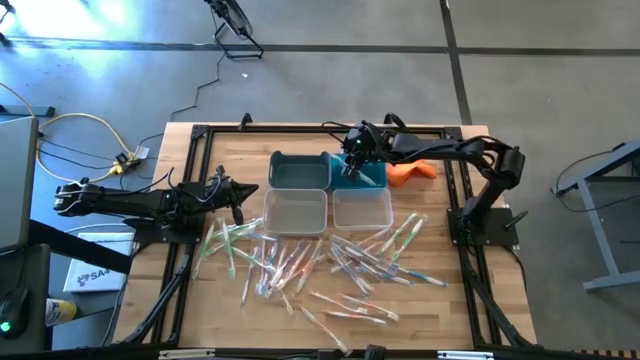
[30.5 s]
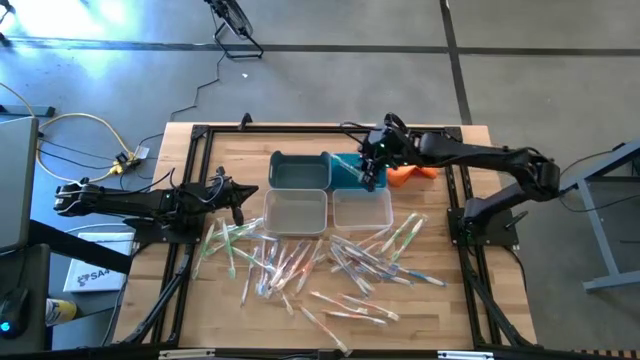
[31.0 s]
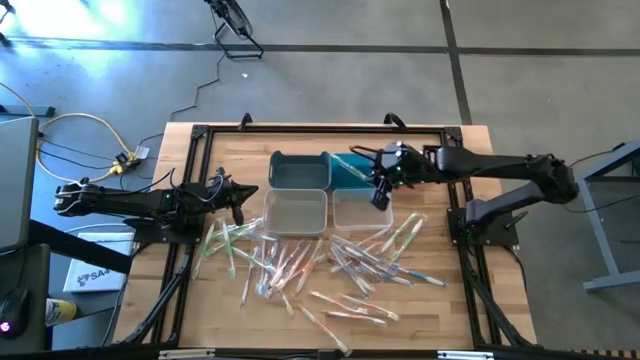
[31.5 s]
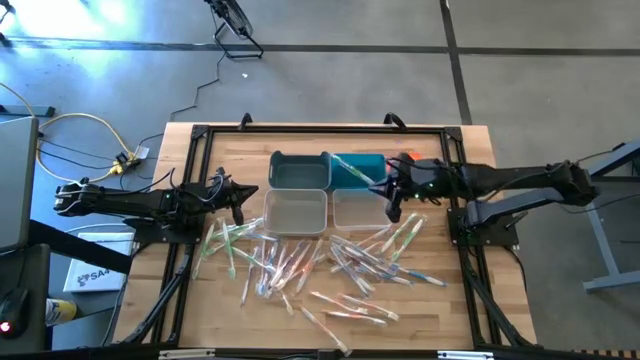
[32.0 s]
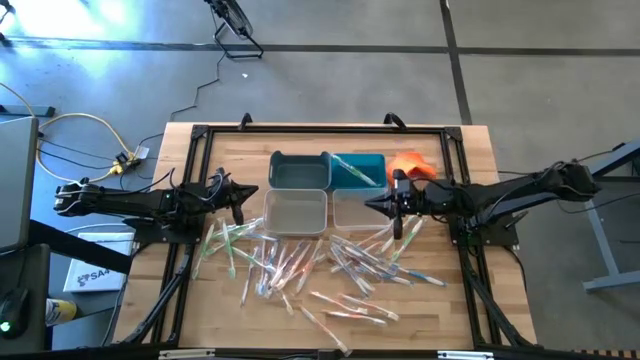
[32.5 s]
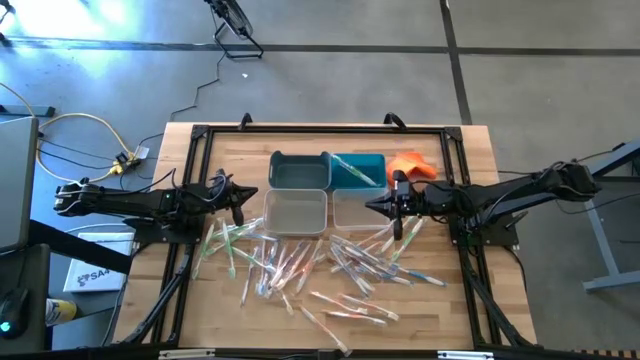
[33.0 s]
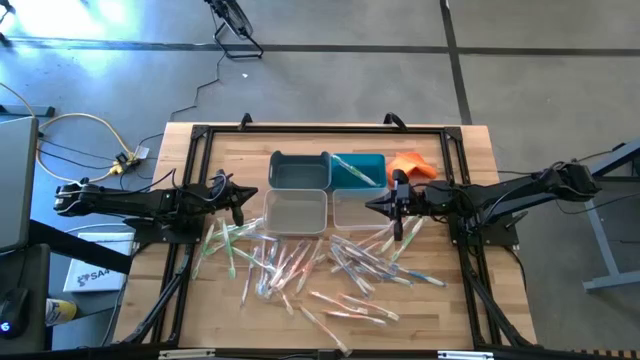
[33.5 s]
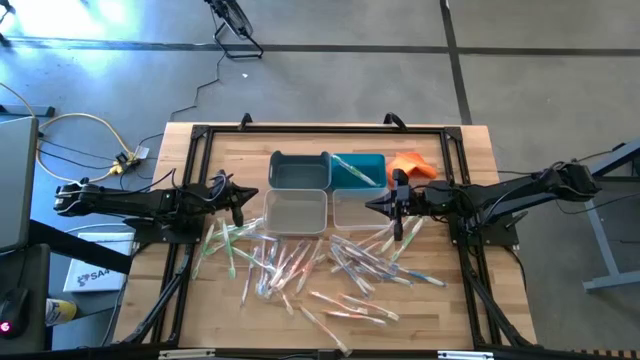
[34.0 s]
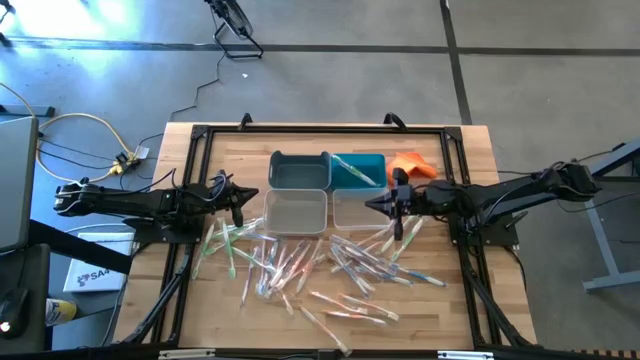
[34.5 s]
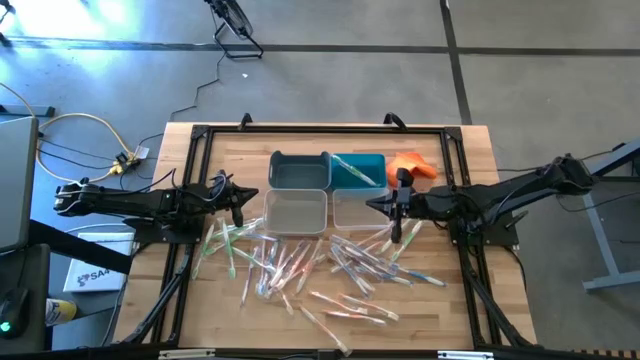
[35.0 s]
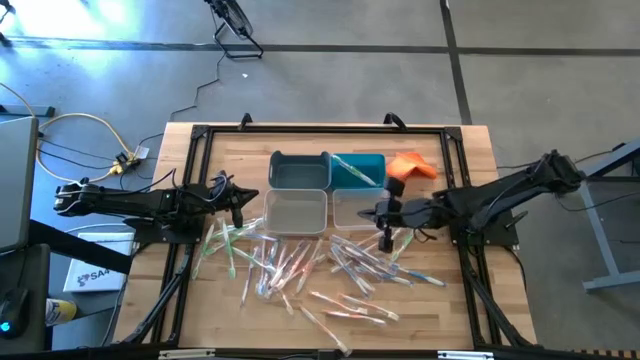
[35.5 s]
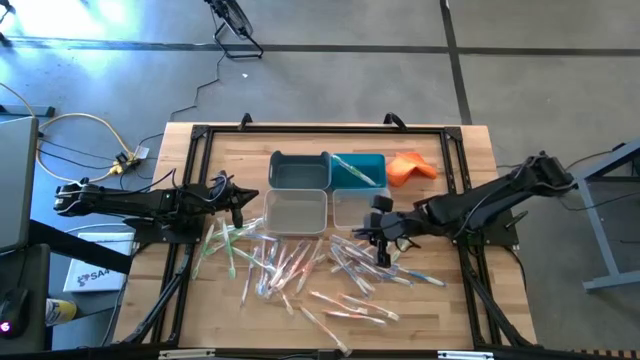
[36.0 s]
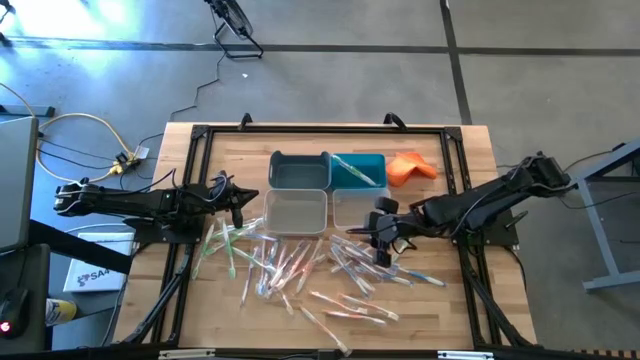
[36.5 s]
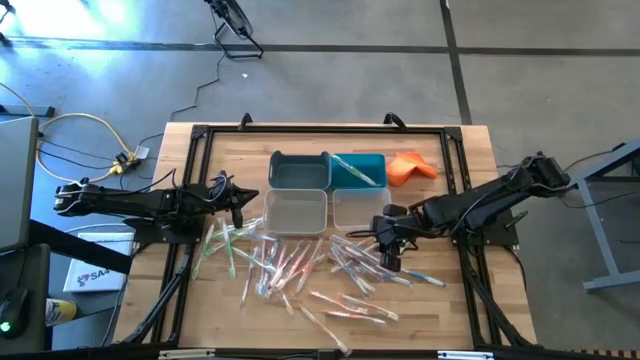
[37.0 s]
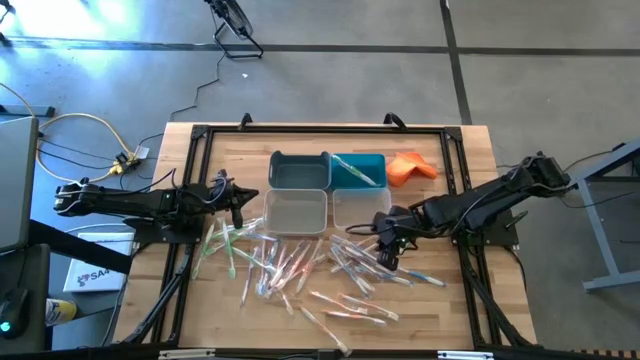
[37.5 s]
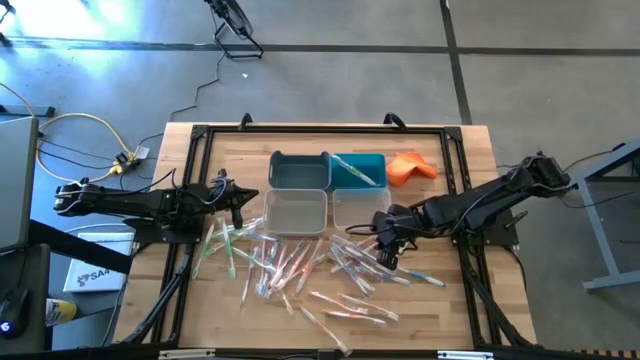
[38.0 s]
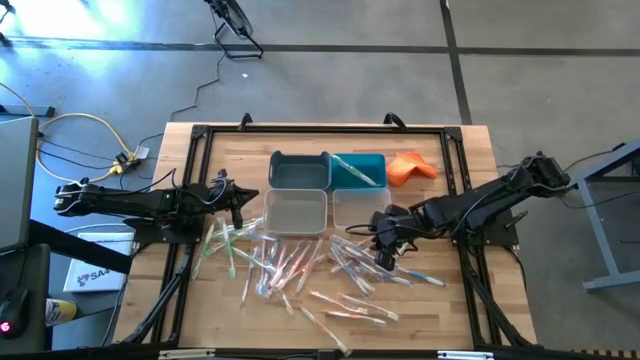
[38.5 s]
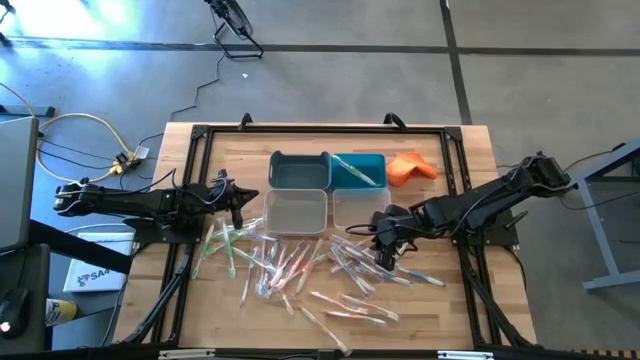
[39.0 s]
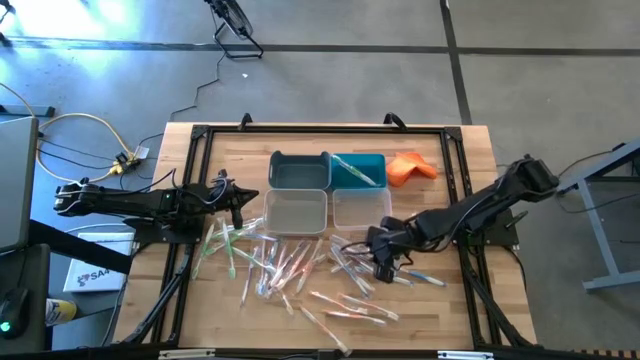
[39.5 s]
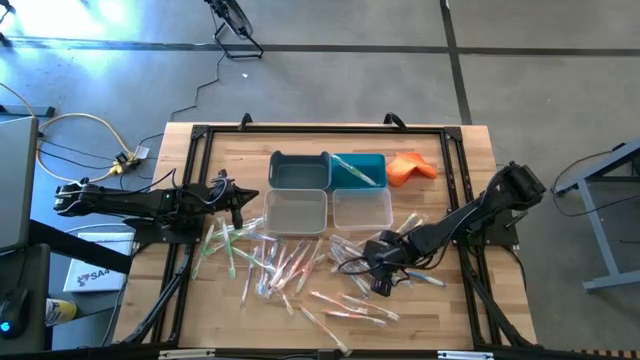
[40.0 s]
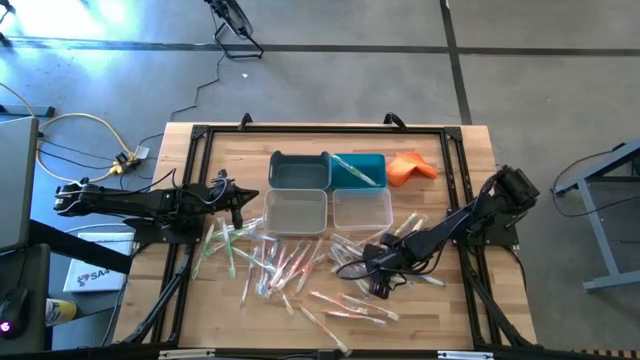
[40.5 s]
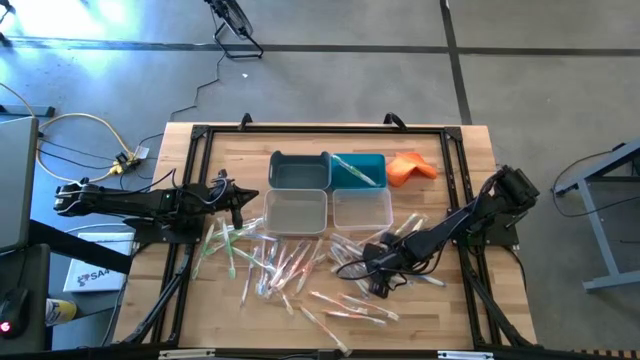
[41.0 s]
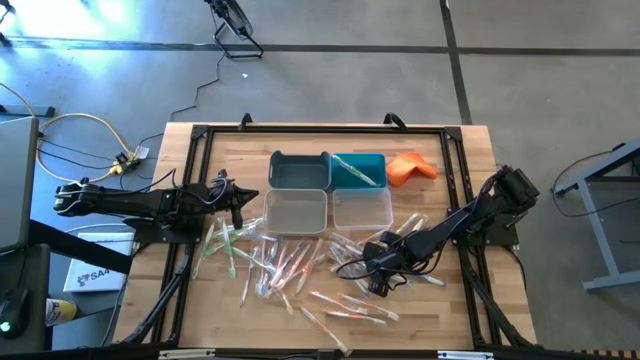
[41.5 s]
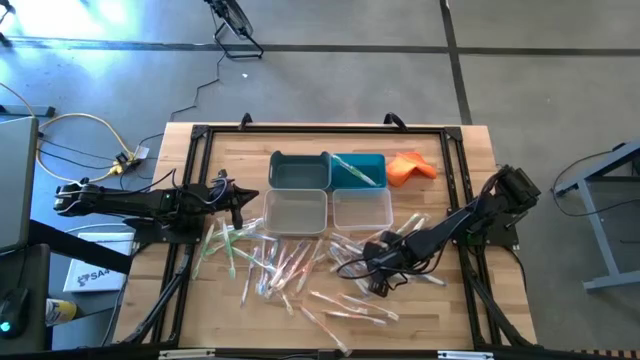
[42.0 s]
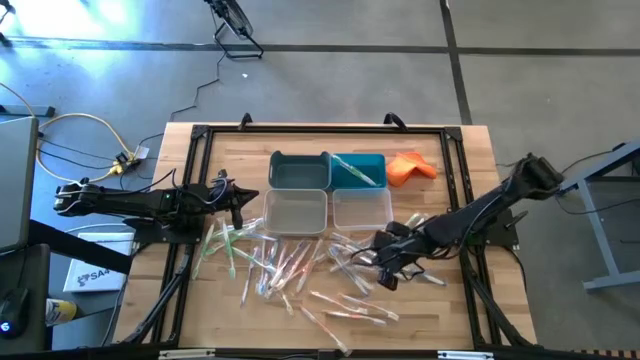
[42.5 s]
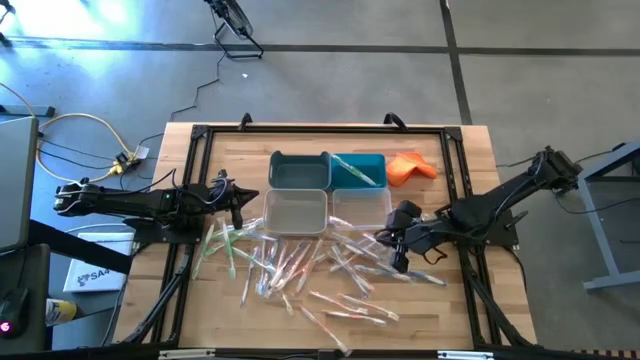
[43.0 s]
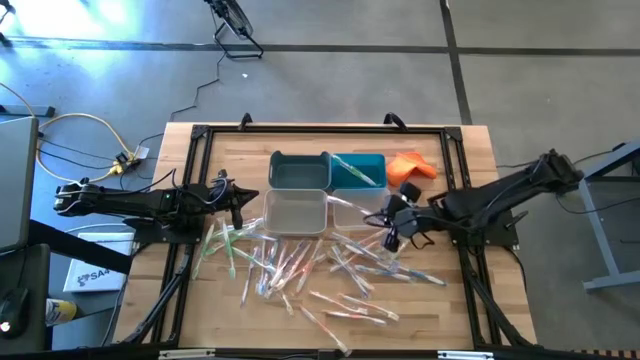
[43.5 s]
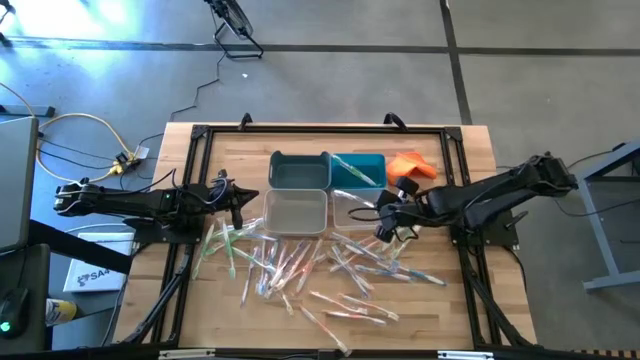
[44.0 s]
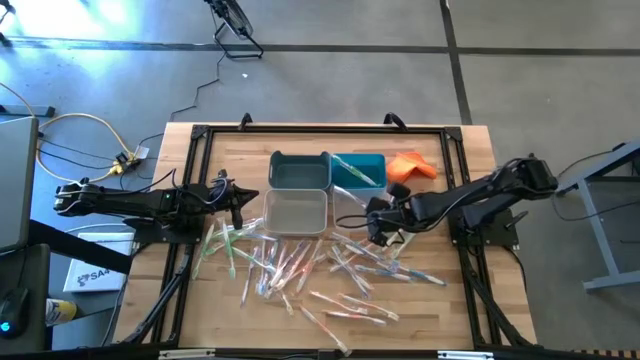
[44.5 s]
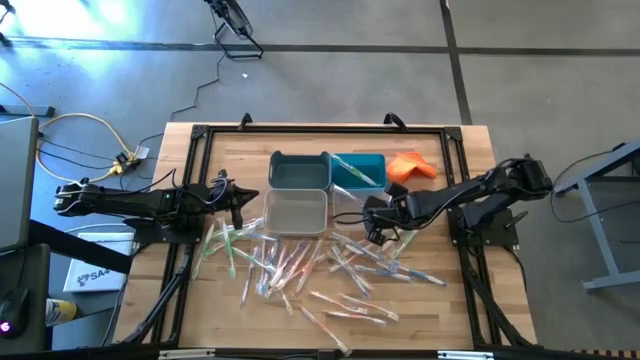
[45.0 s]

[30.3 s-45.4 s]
Task: Pick & Place Toothbrushes
Put the purple toothbrush into the transparent bin

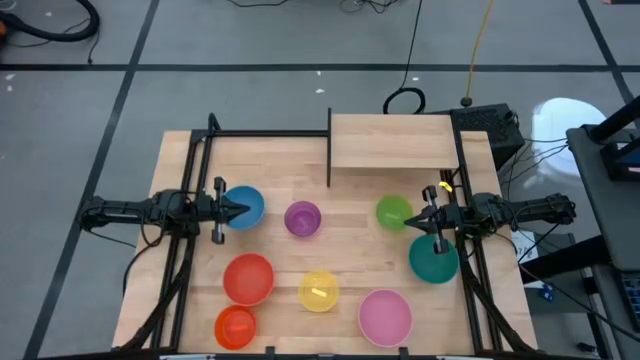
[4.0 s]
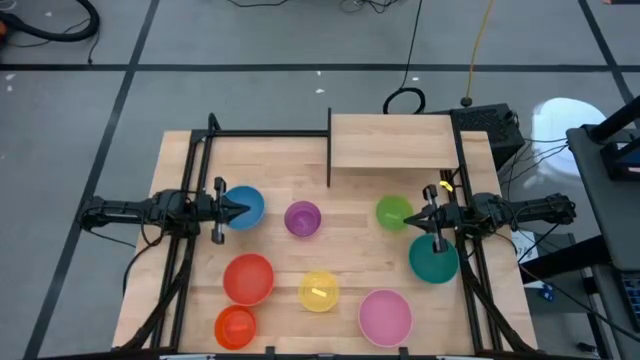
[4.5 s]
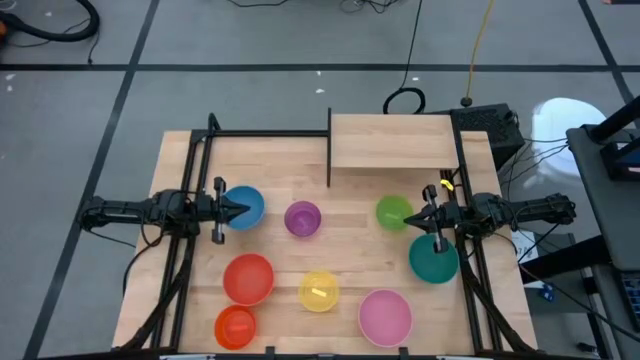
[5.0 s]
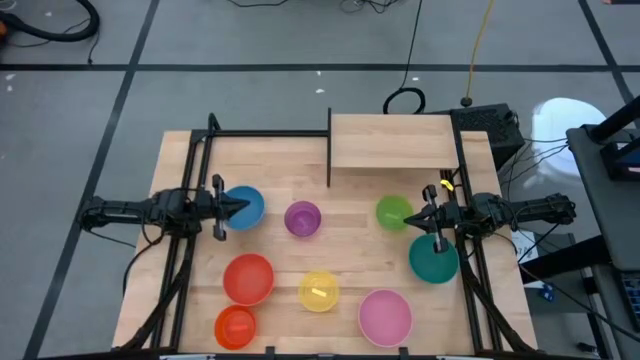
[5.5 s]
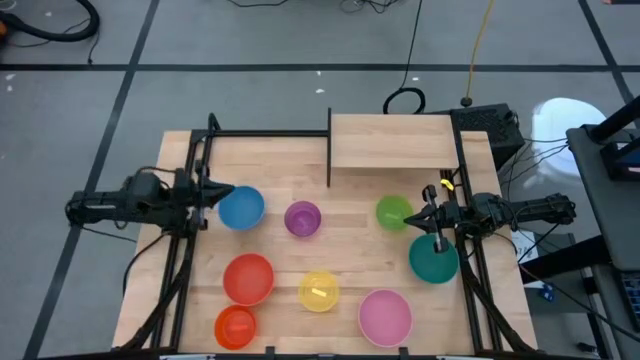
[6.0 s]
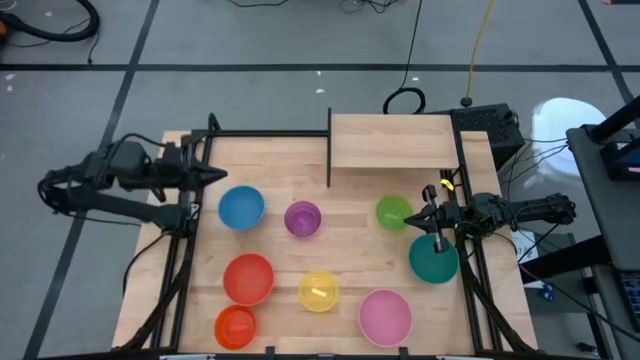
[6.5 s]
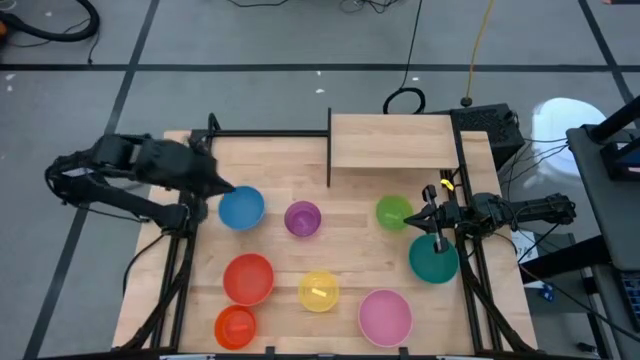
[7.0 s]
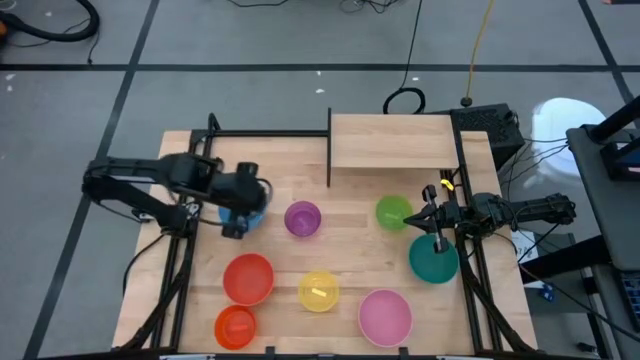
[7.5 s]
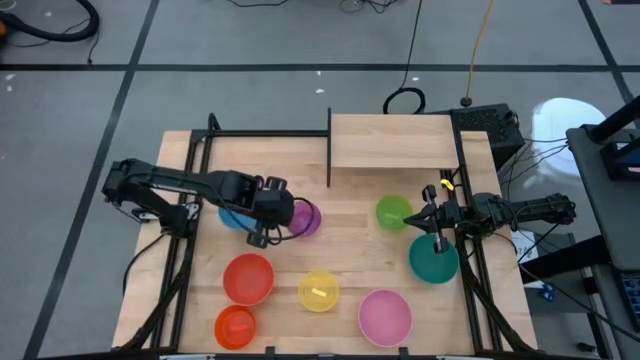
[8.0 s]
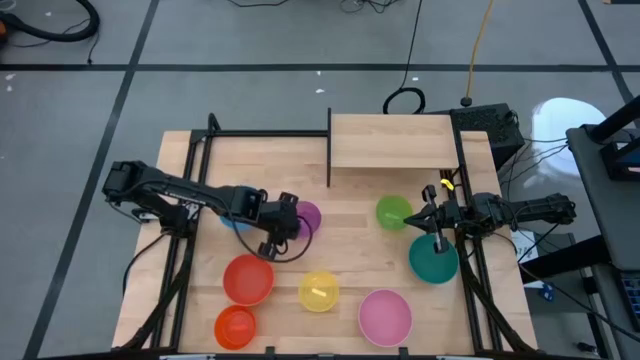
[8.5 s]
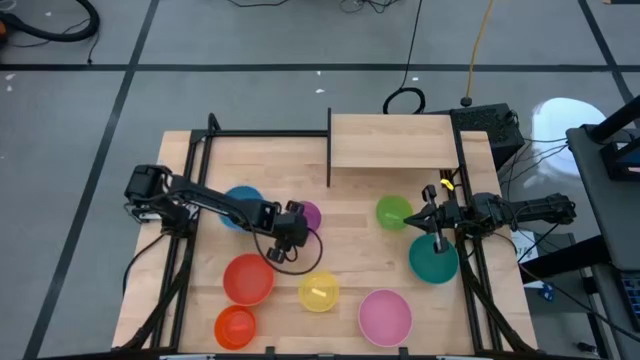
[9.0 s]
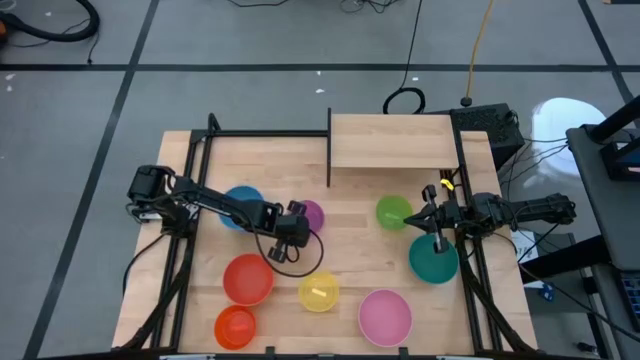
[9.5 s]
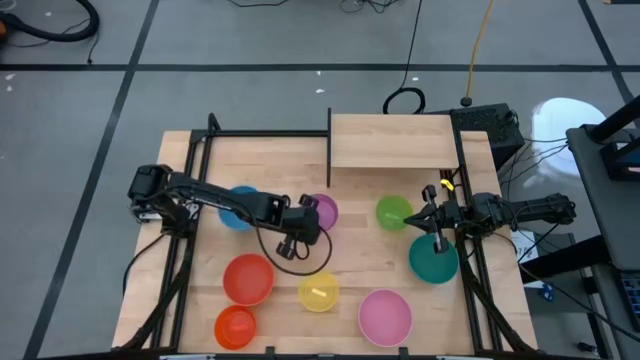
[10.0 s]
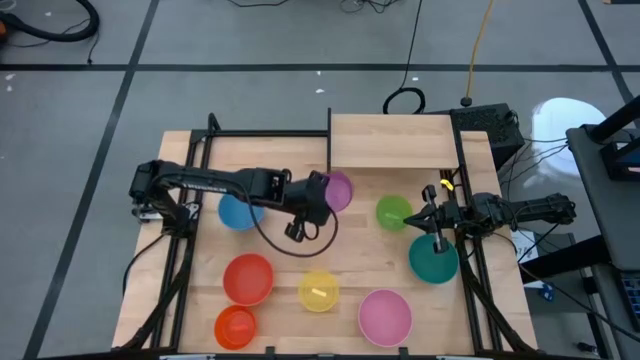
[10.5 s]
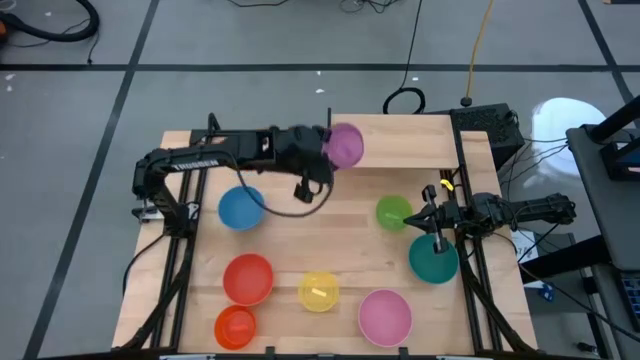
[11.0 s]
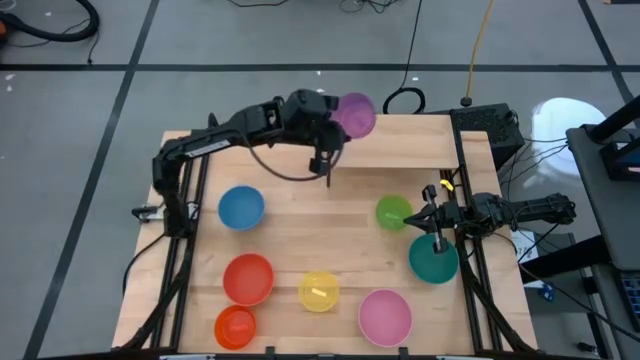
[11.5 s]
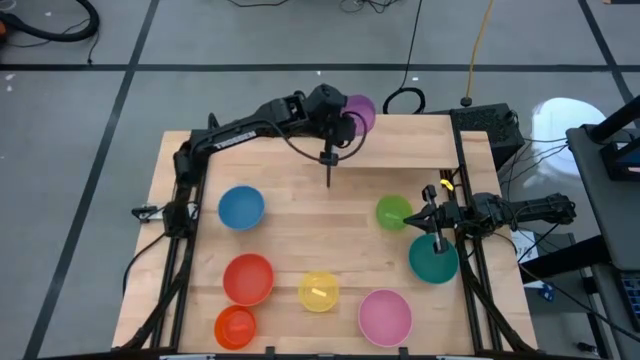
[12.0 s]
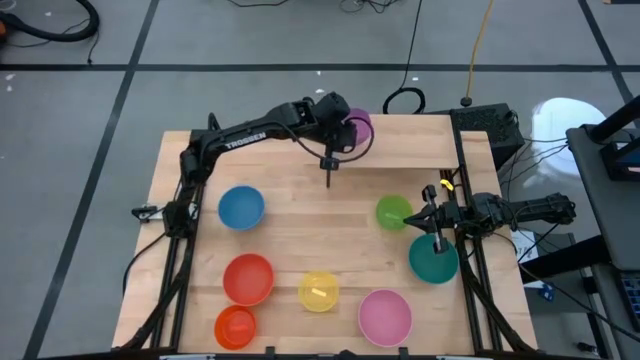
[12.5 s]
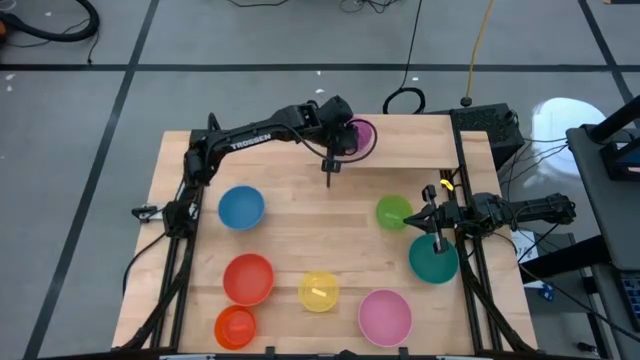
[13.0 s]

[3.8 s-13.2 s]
Task: Place and stack bowls onto a shelf
Put the small violet bowl on the shelf
